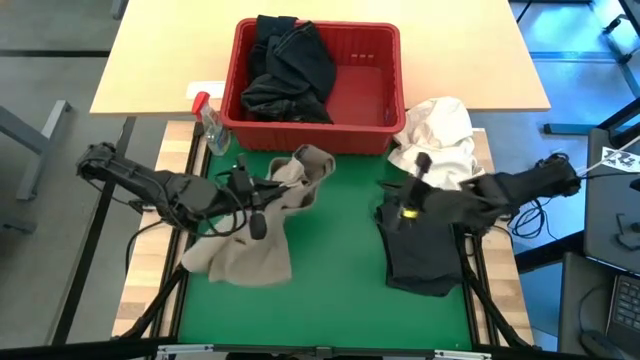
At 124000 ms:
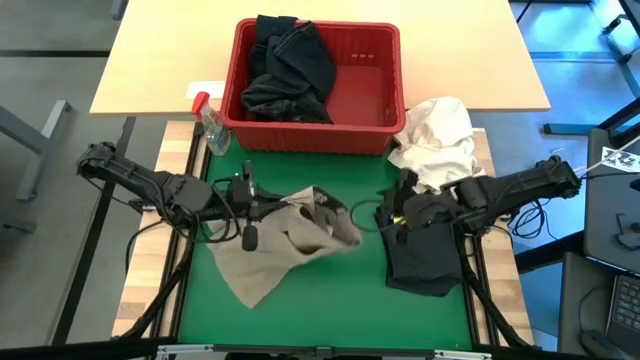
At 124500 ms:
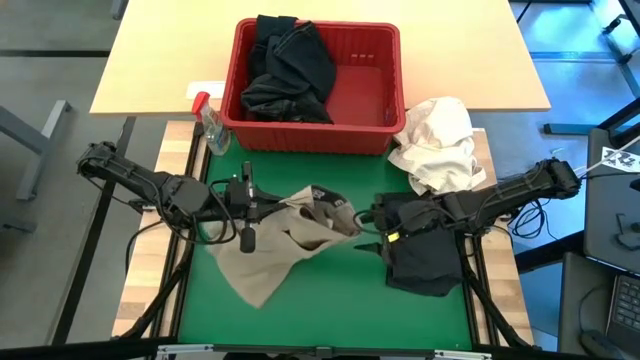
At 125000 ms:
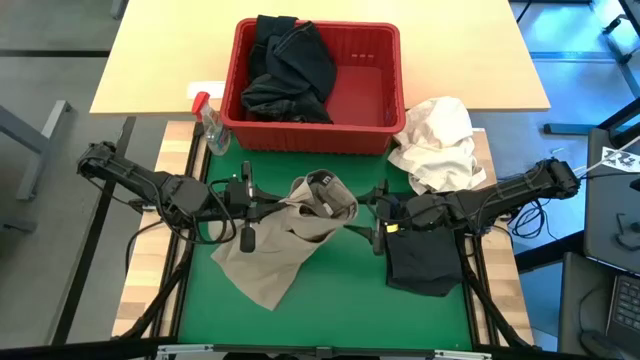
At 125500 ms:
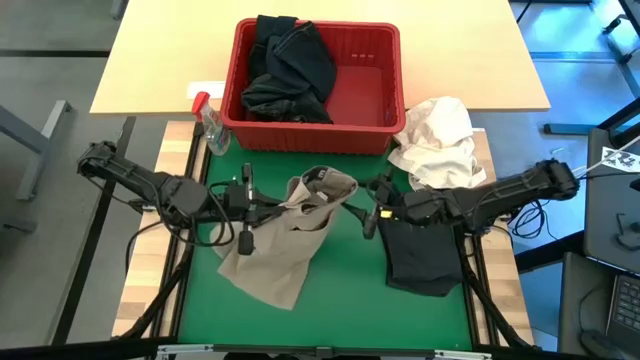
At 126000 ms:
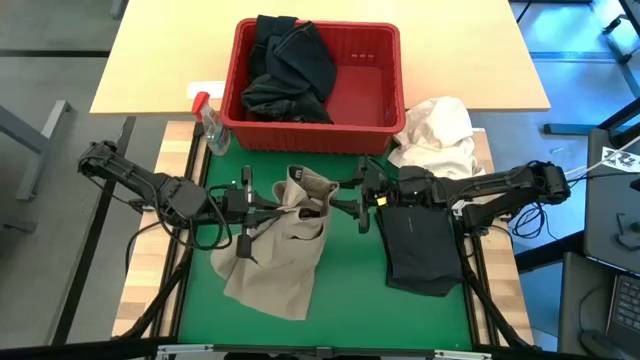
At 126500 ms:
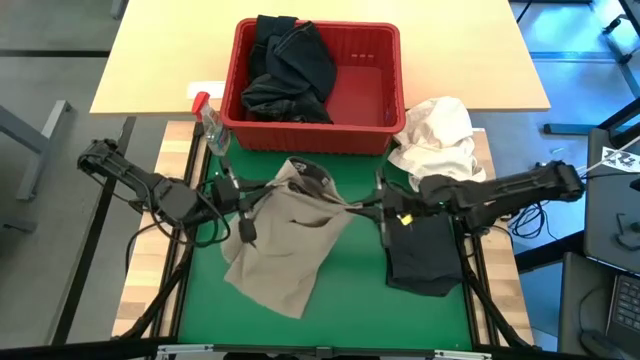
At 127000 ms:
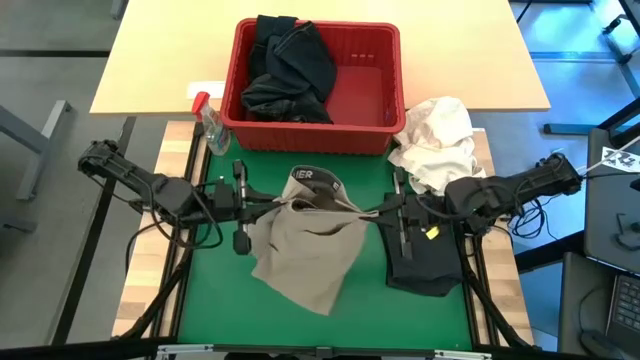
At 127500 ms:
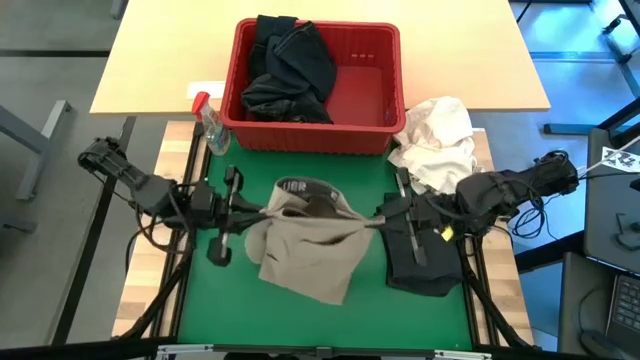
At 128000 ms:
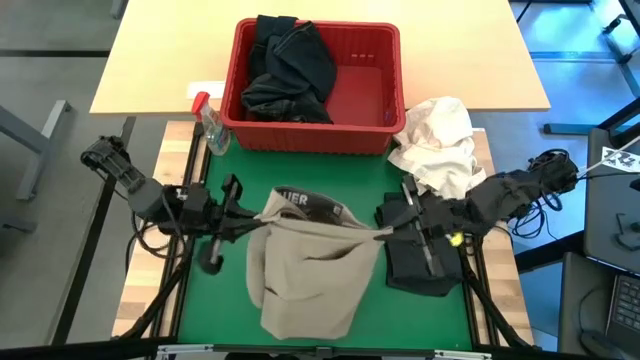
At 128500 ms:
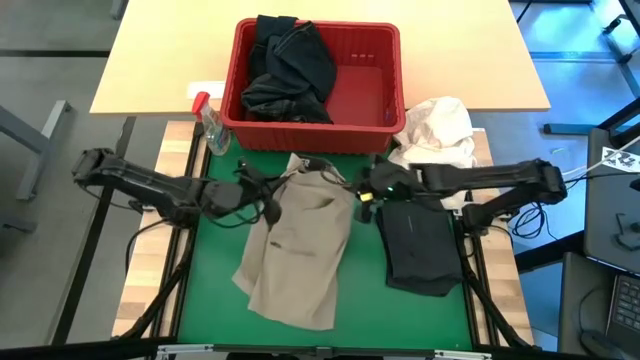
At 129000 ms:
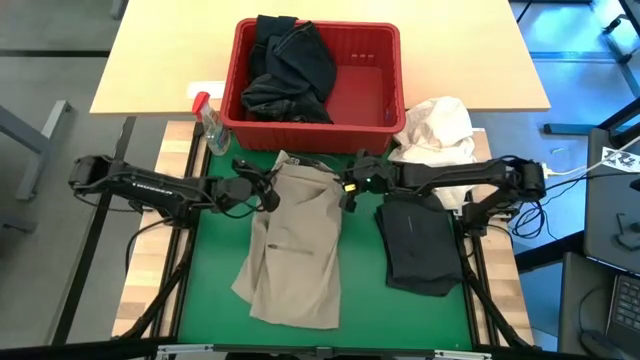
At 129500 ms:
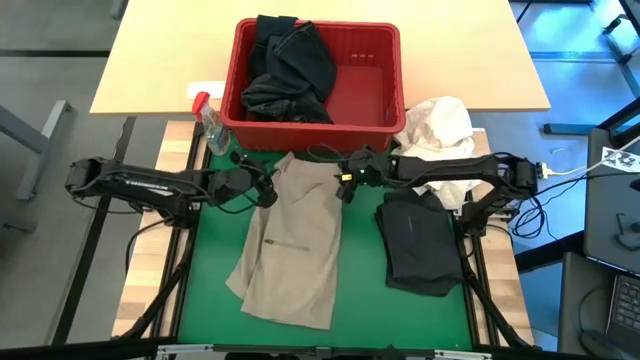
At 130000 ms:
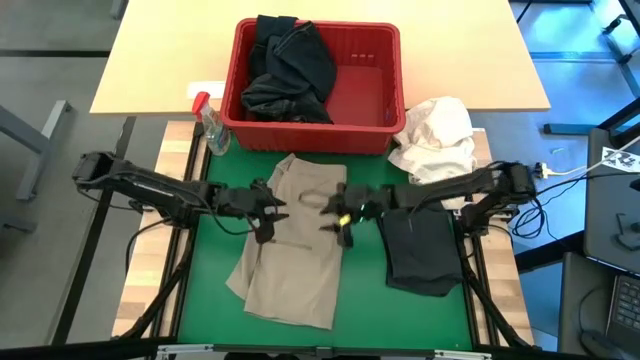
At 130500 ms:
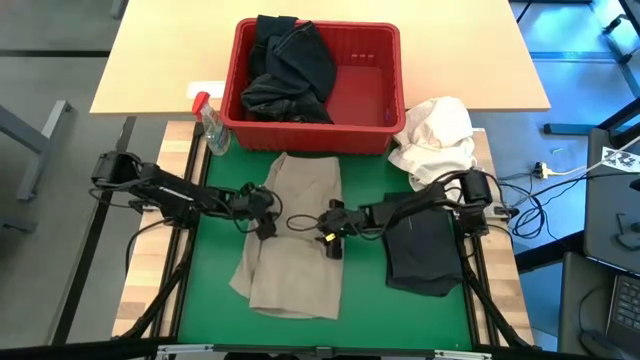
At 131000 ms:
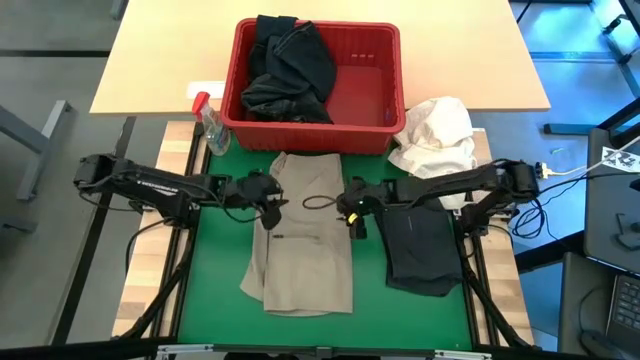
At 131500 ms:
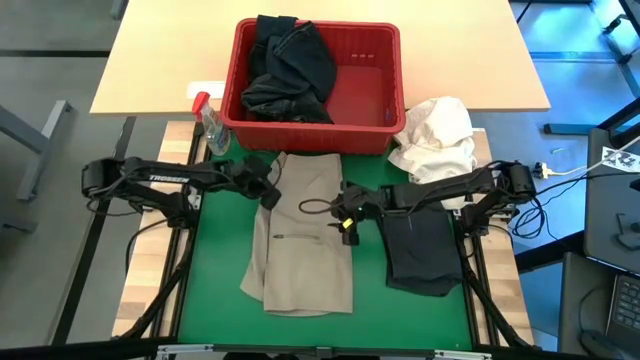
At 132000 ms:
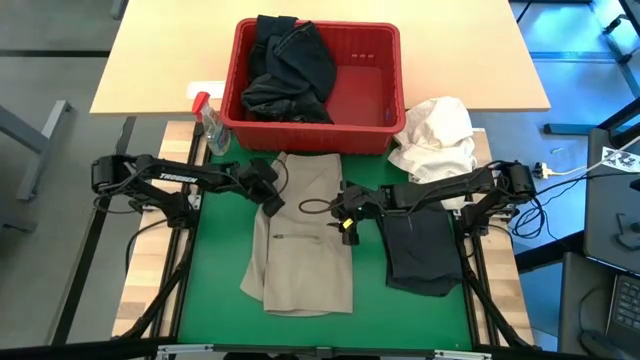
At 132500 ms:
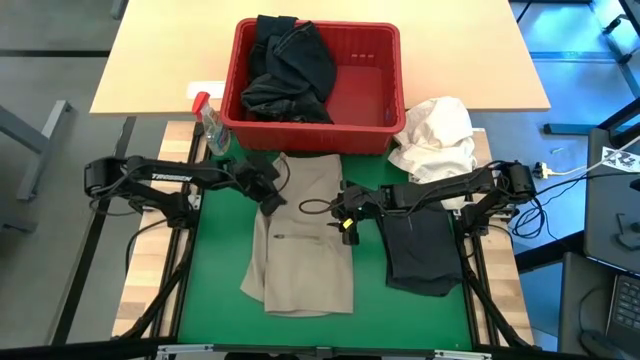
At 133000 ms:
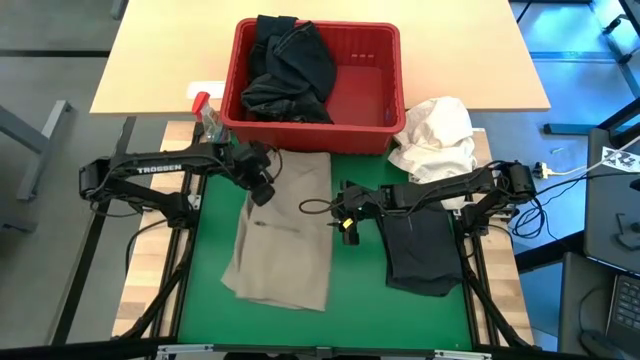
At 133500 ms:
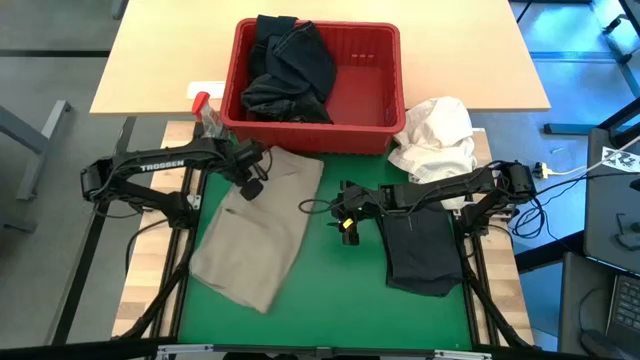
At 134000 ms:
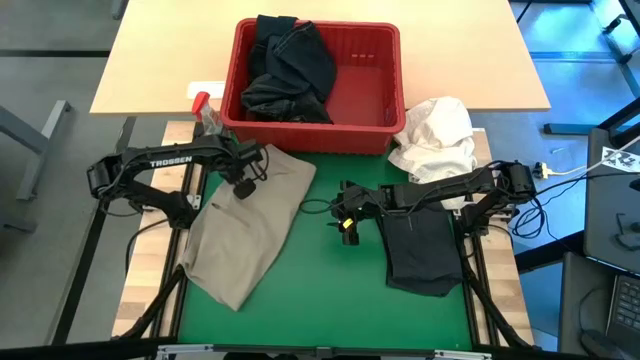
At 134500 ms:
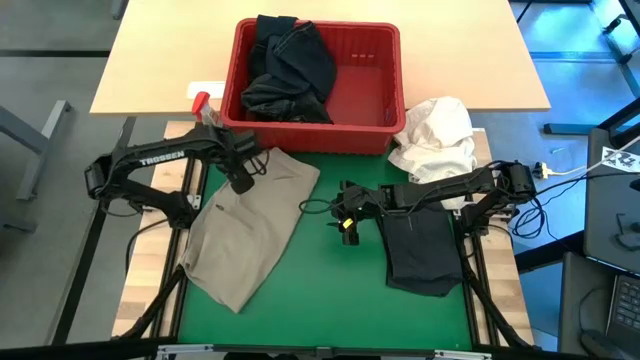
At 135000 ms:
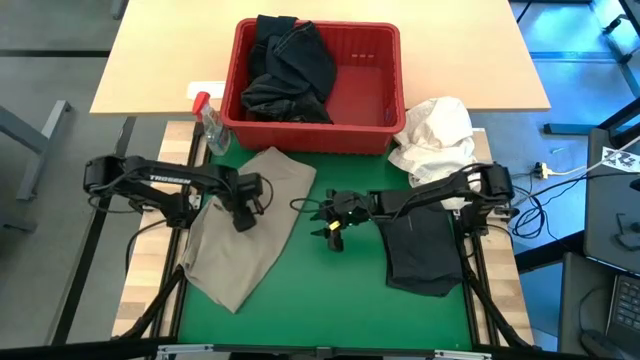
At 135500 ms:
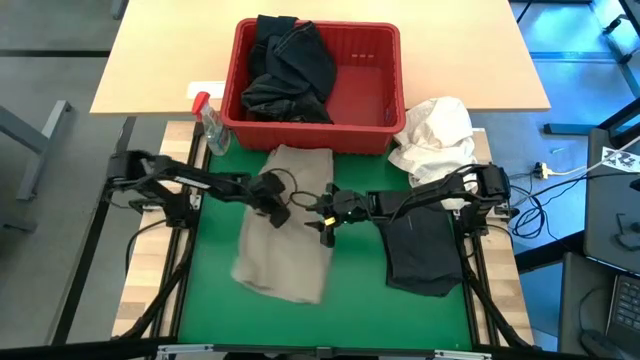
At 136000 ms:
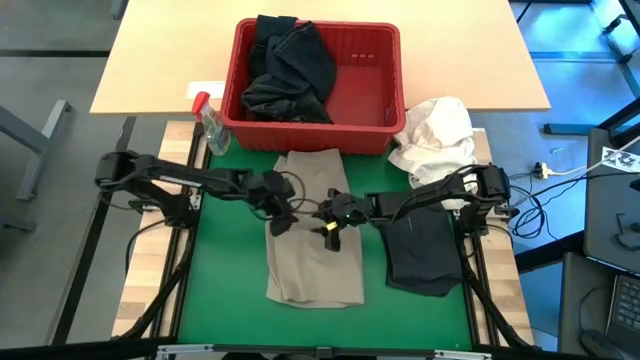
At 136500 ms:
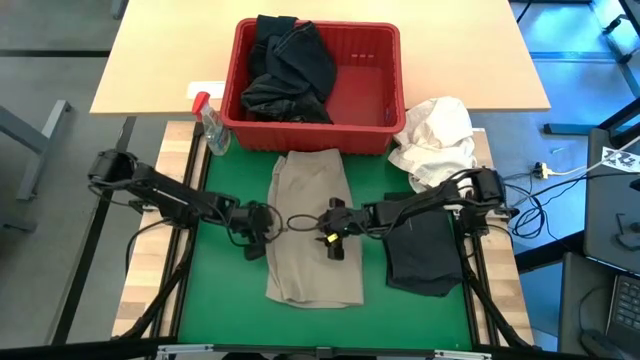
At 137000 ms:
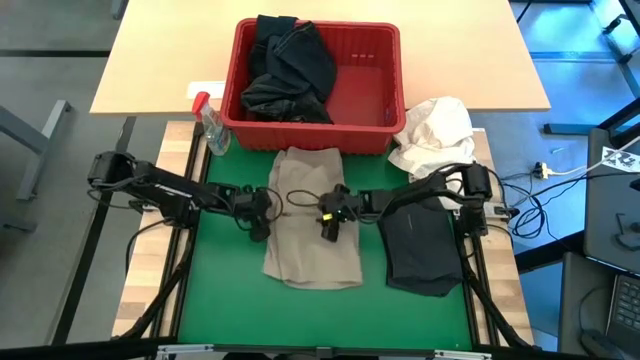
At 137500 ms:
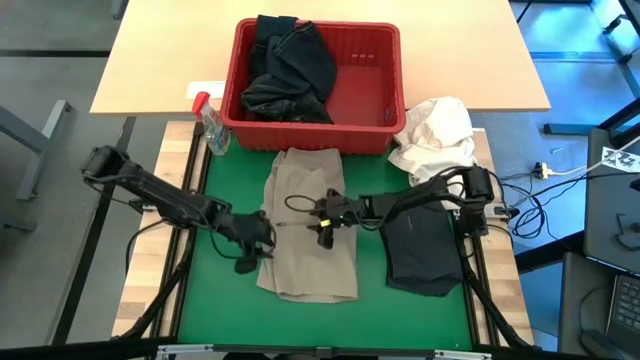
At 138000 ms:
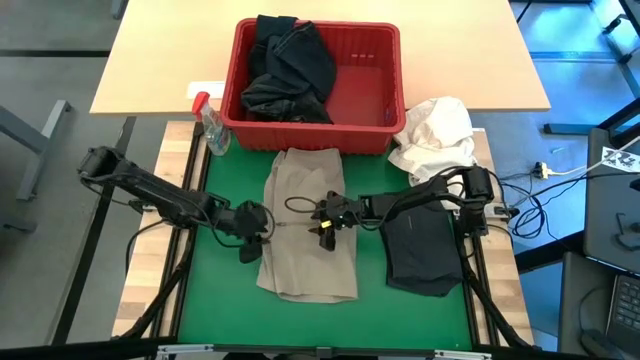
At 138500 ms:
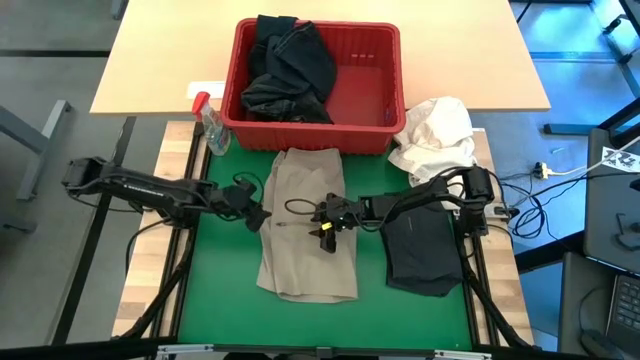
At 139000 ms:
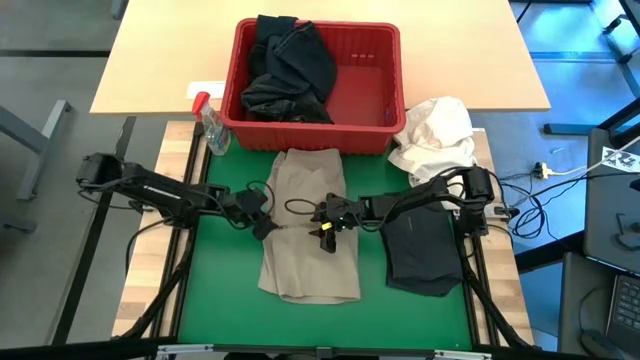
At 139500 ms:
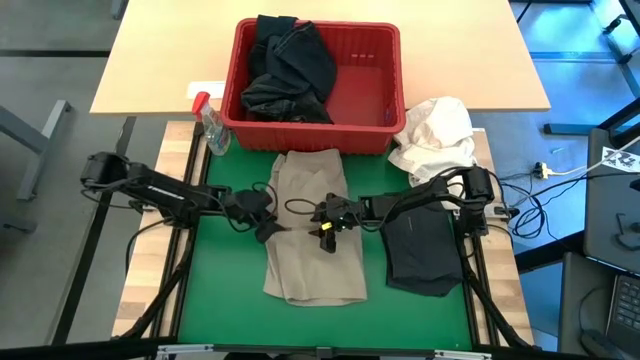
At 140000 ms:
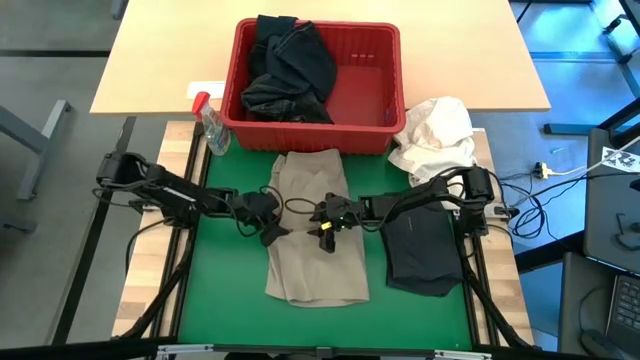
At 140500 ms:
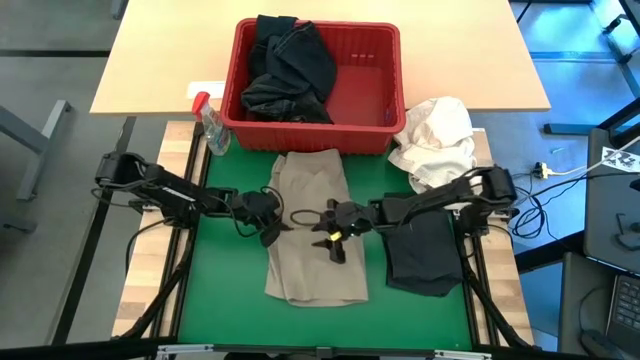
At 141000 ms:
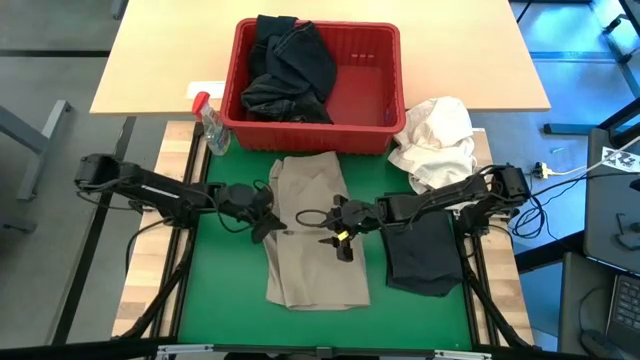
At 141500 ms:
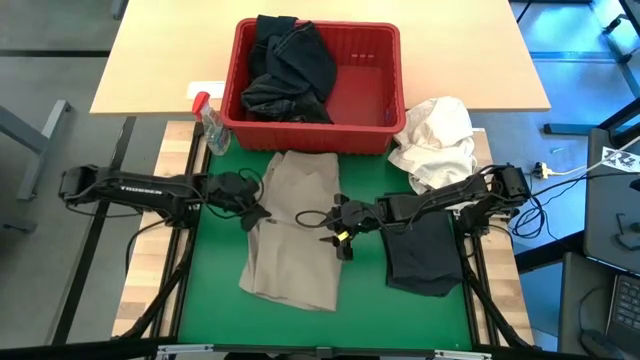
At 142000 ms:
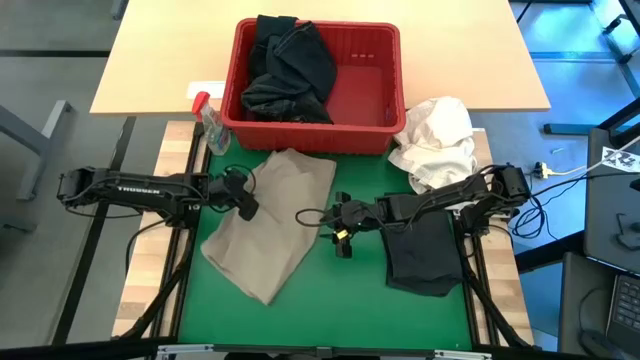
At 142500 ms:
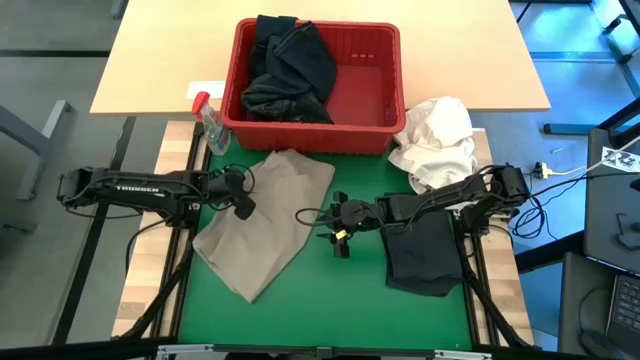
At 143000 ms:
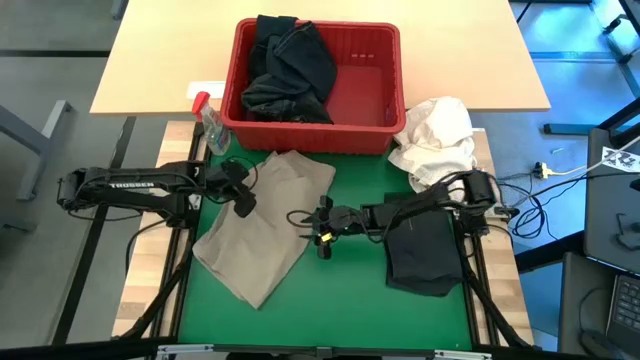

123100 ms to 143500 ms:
Task: Fold Laundry from Bin
Fold the brown shorts
